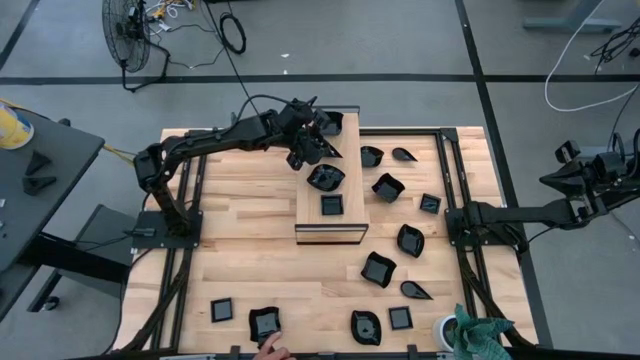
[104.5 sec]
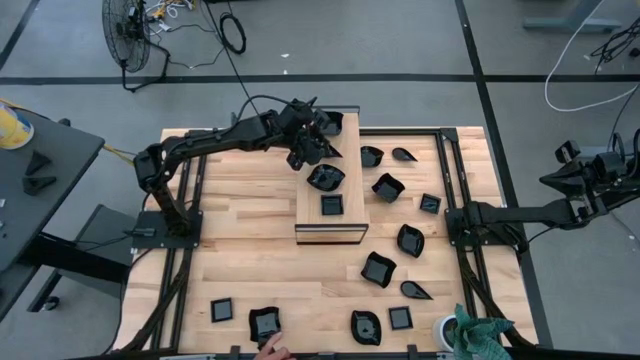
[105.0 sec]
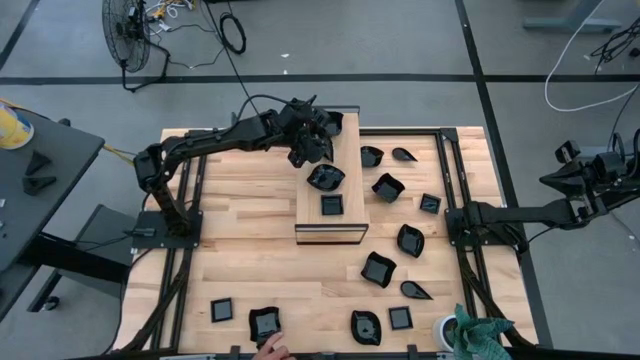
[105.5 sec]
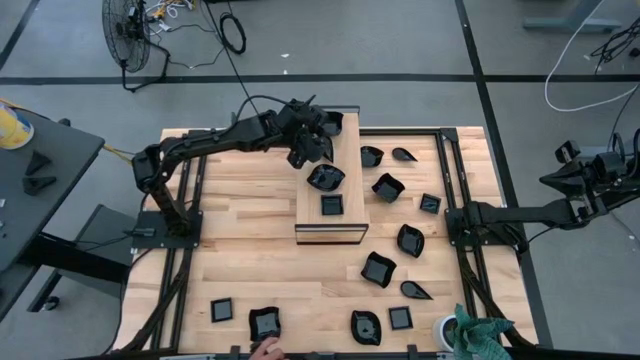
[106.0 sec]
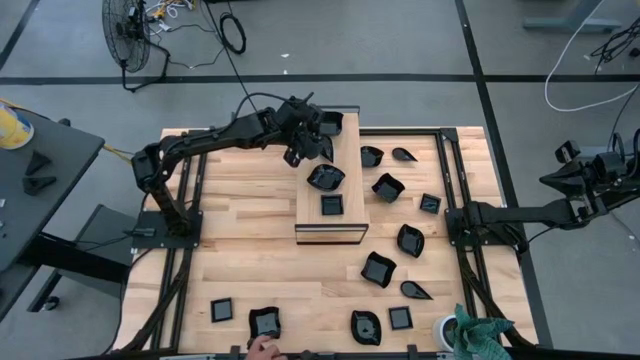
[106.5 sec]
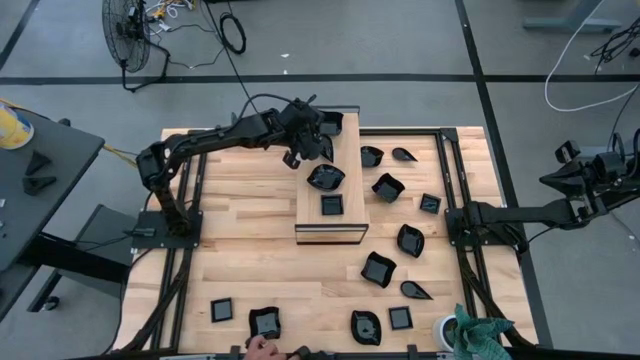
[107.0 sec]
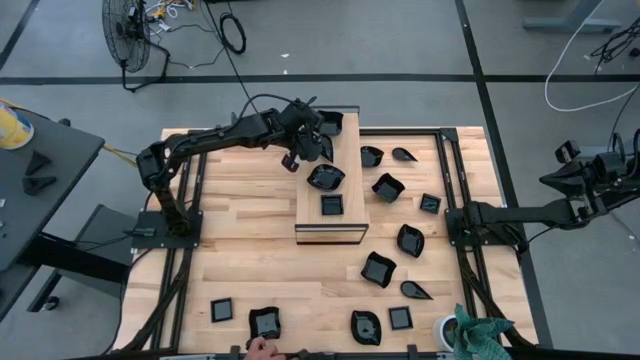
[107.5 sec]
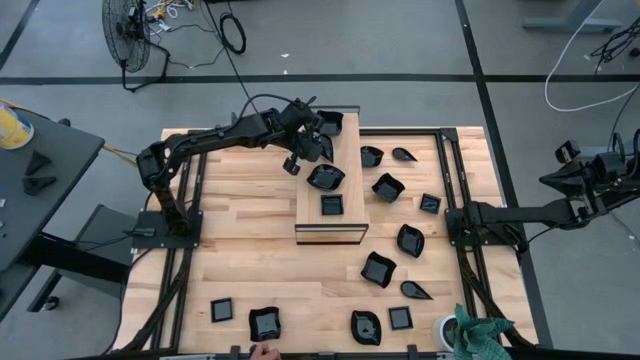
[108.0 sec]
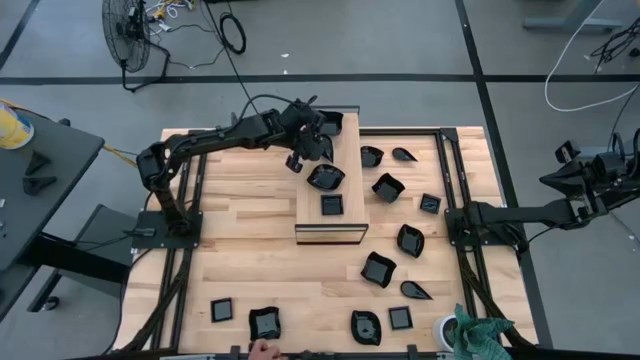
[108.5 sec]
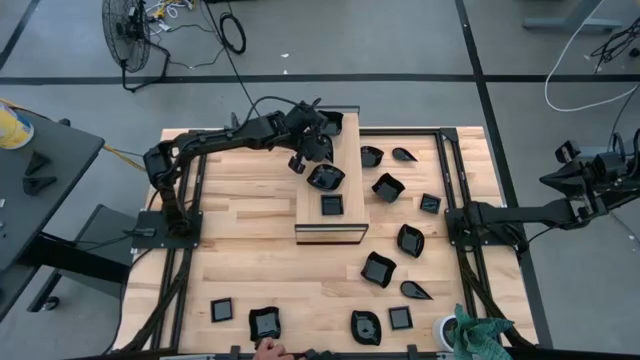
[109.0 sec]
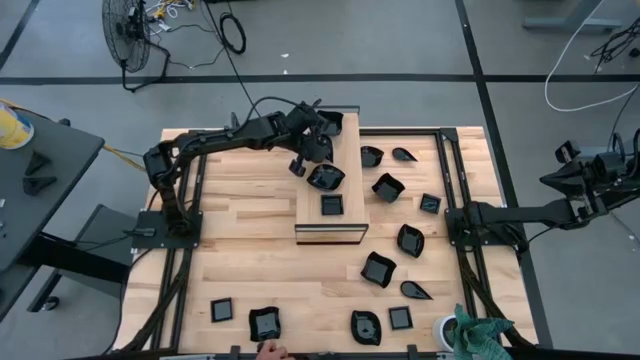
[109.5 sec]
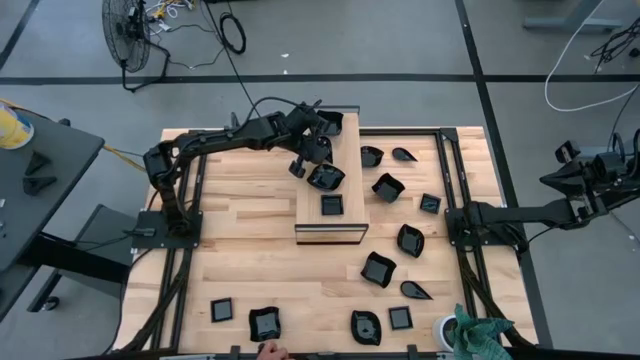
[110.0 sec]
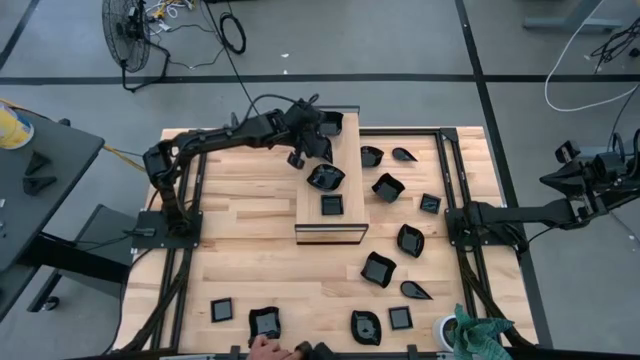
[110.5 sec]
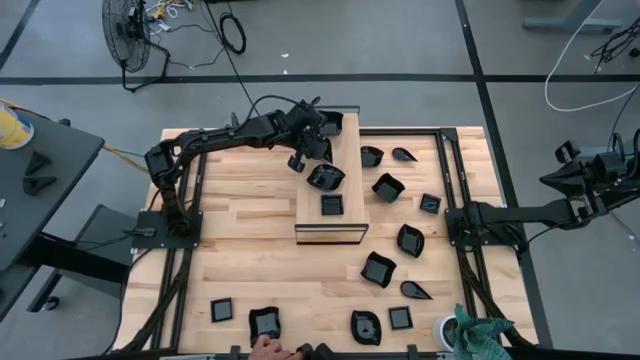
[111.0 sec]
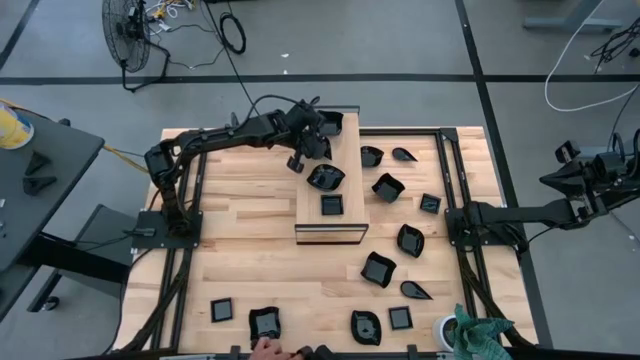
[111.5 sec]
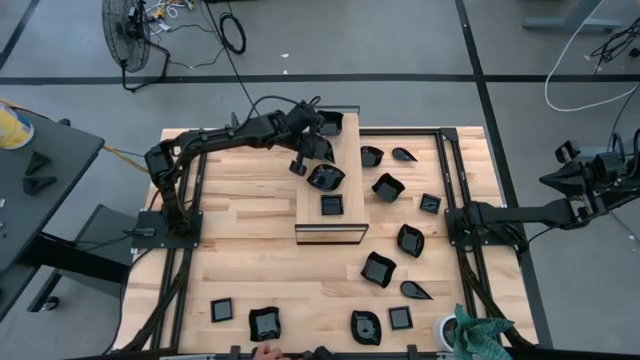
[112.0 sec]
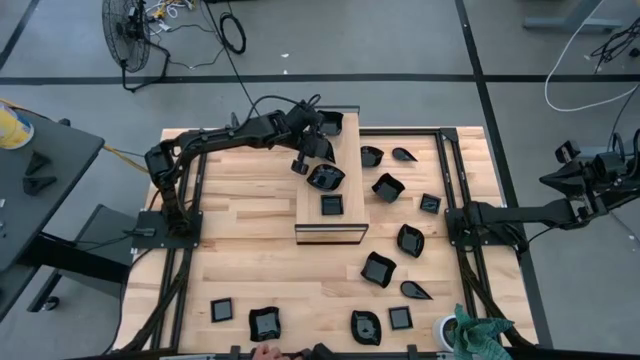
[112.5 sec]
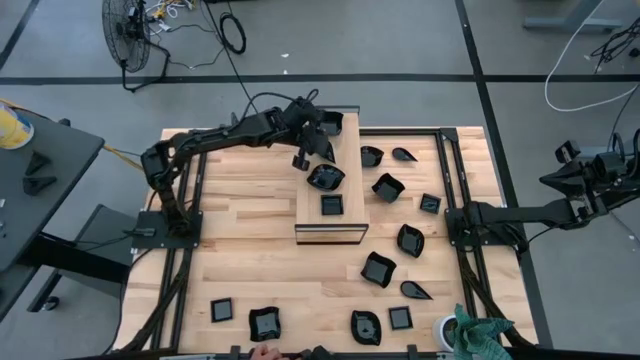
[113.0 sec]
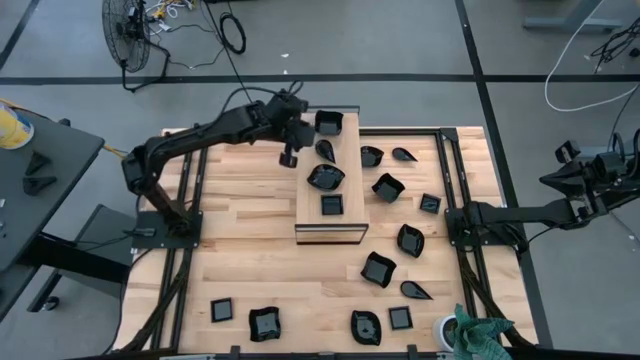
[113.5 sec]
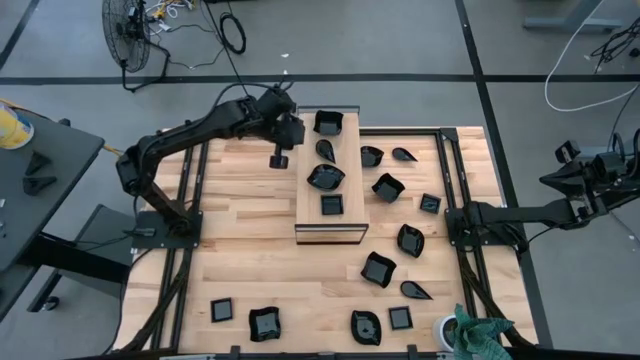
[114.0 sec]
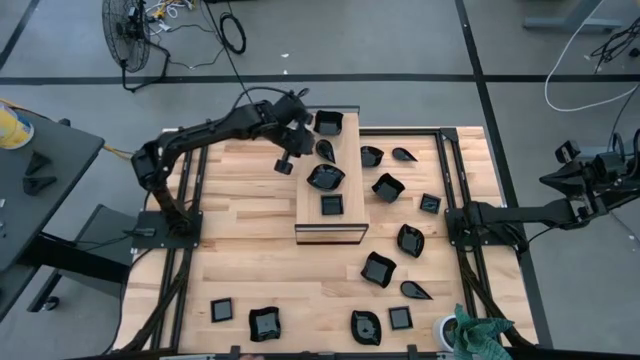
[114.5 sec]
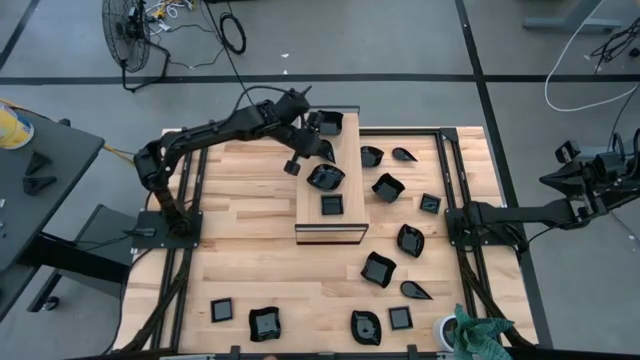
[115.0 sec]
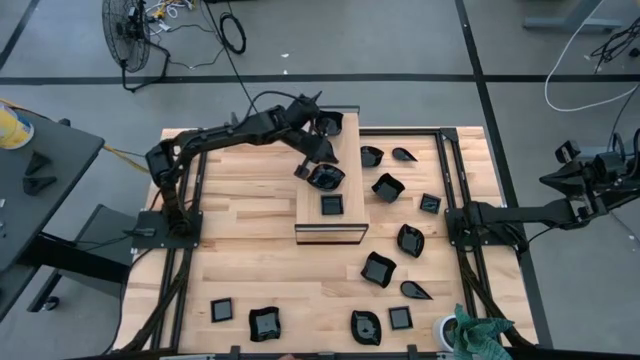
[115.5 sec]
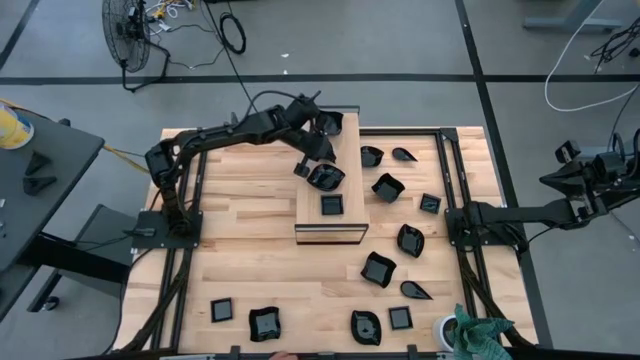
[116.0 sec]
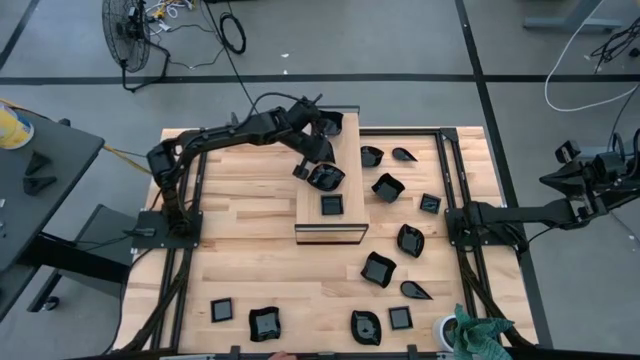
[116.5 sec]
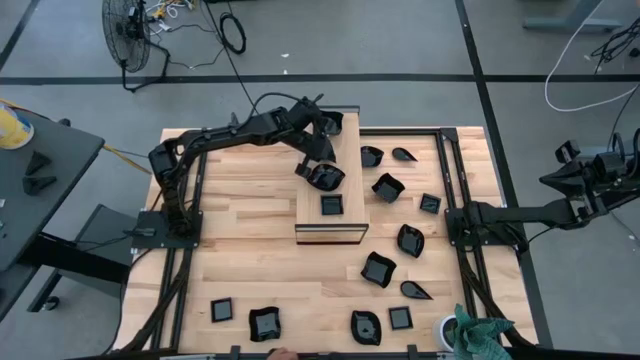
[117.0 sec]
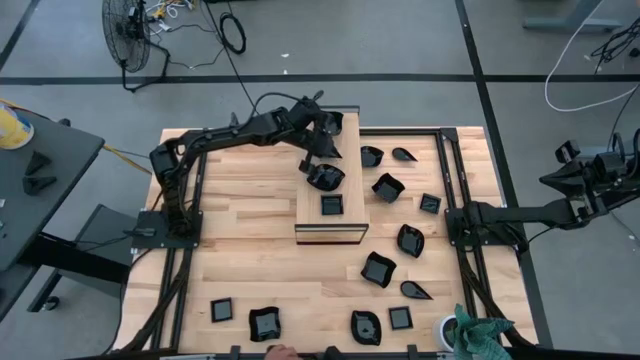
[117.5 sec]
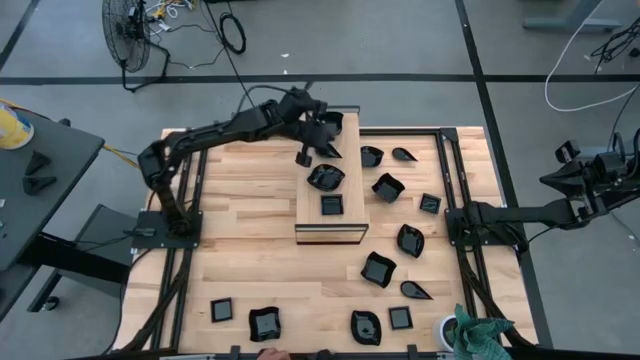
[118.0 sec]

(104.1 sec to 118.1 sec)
Task: Pick & Place Mini shaped plates
Stack the drop-shaped plate on top of the drop-shaped plate on the shelf

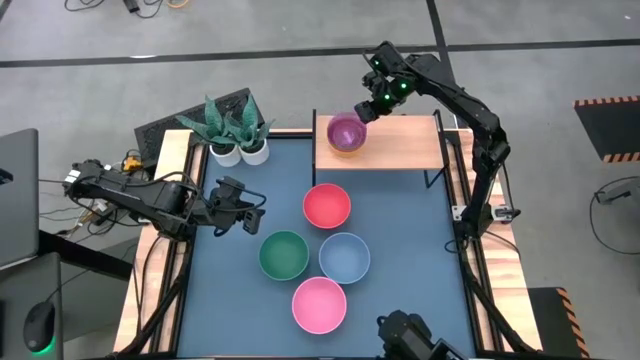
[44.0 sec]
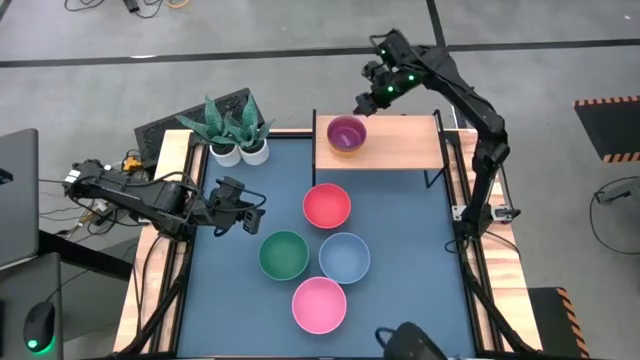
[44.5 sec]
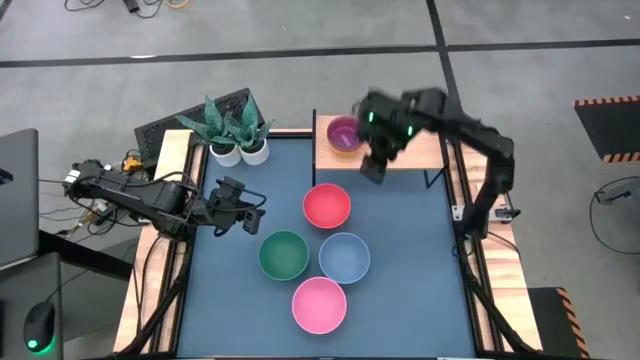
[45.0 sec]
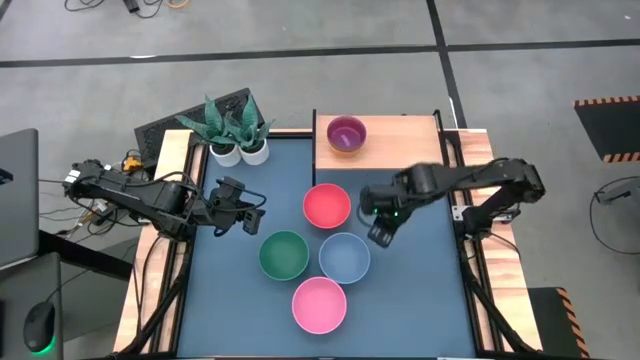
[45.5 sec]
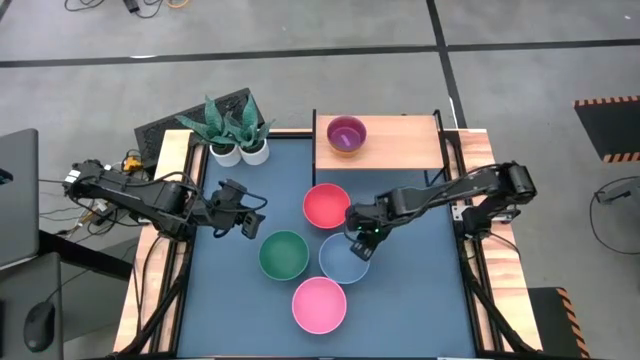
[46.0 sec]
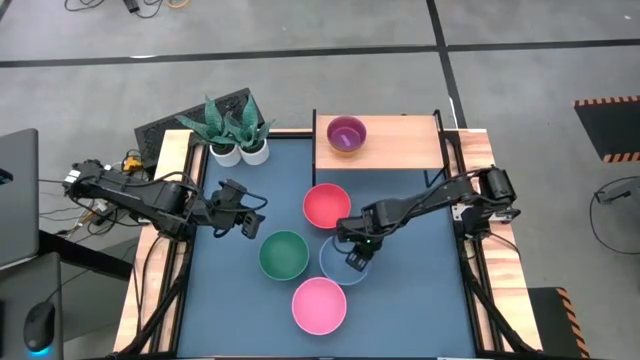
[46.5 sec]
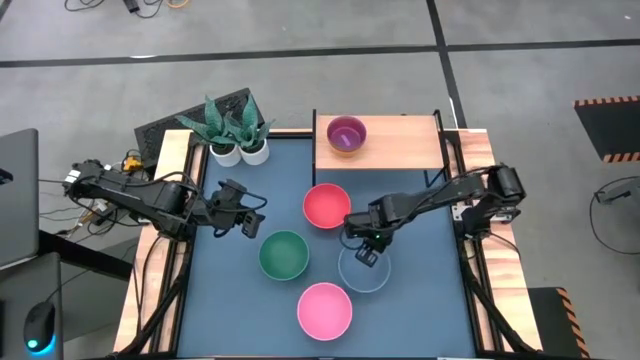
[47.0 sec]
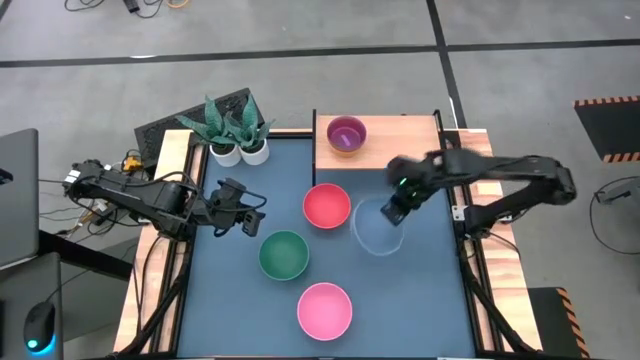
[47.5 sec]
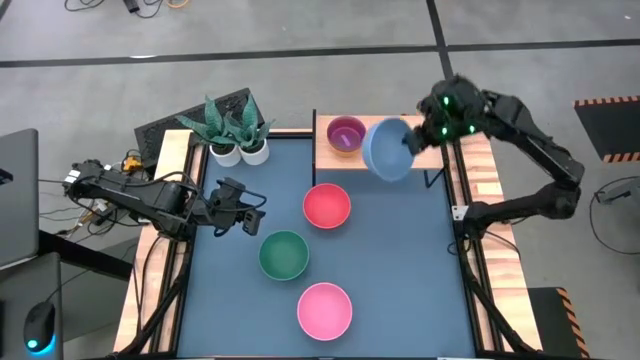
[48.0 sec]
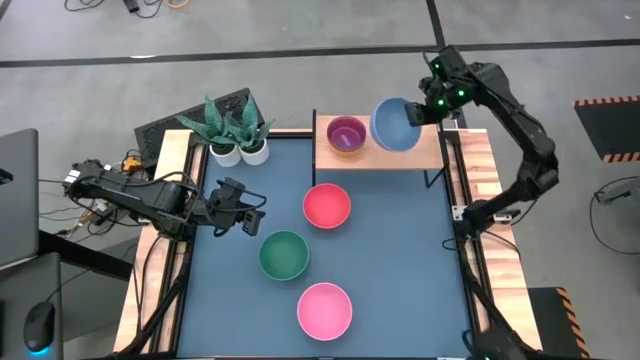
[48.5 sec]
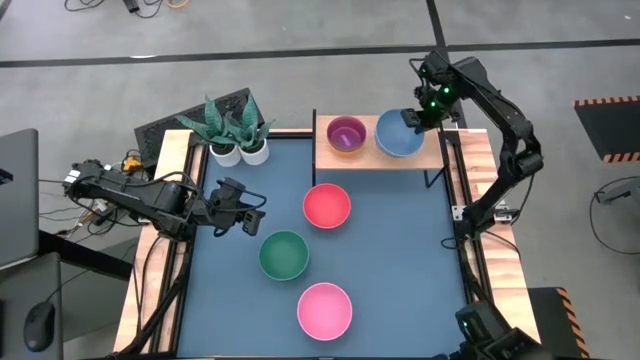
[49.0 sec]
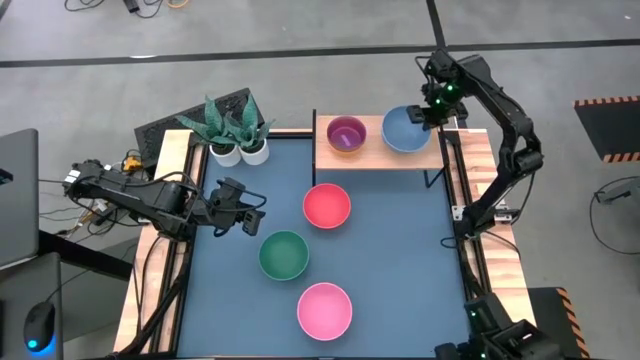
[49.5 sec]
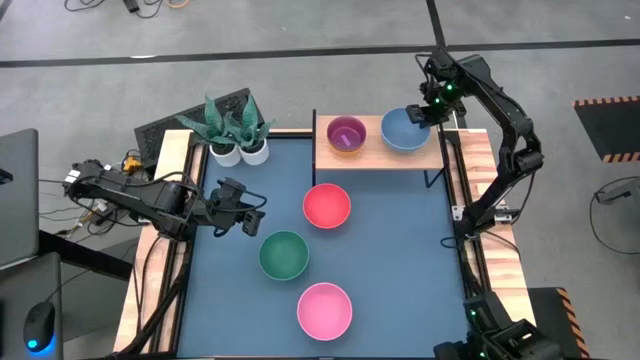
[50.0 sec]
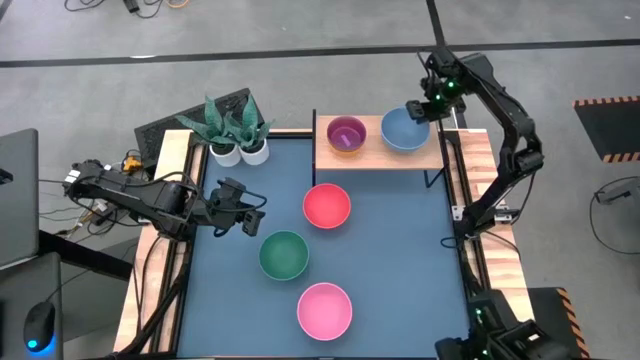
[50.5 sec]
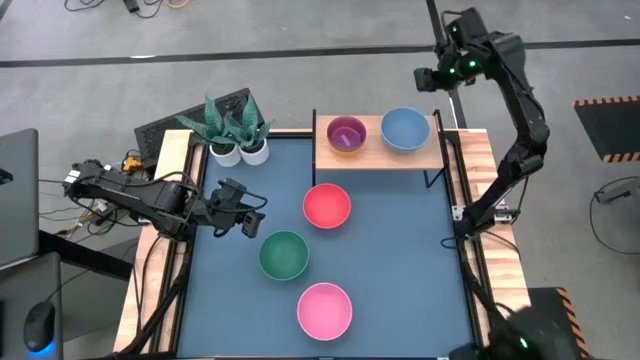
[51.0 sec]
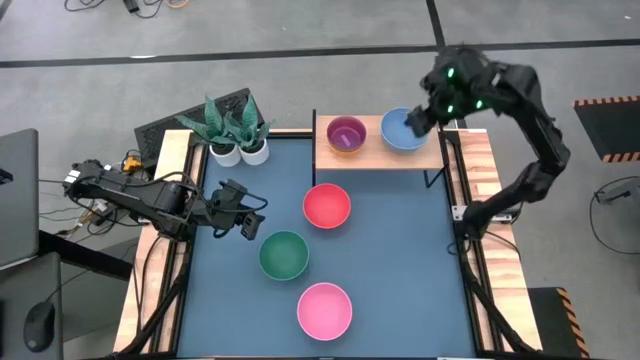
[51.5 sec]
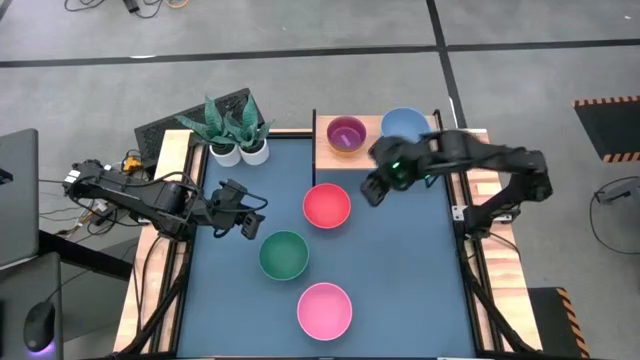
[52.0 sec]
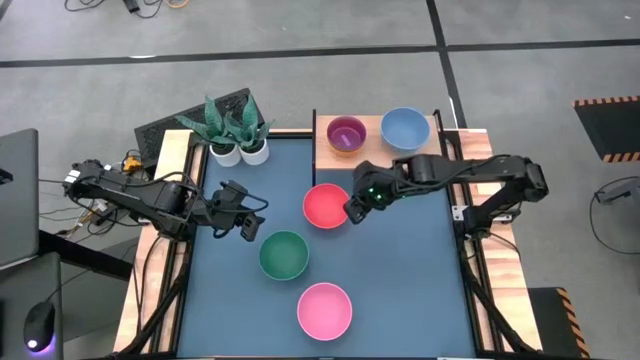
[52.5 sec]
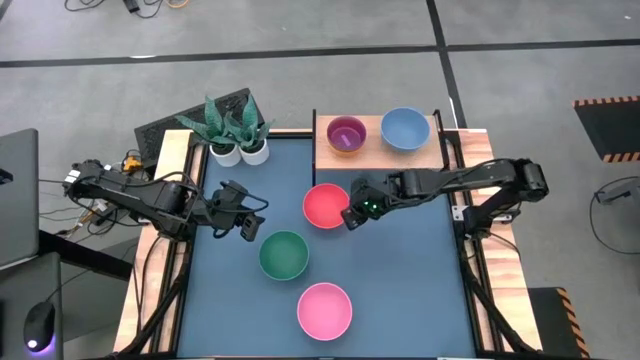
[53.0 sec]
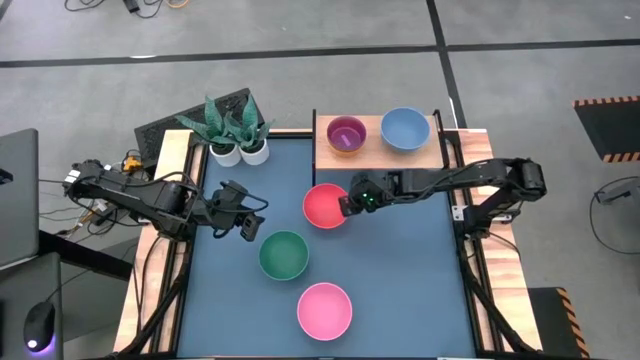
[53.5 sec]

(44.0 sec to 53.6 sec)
Task: Place and stack bowls onto a shelf
Put the blue bowl on the shelf
